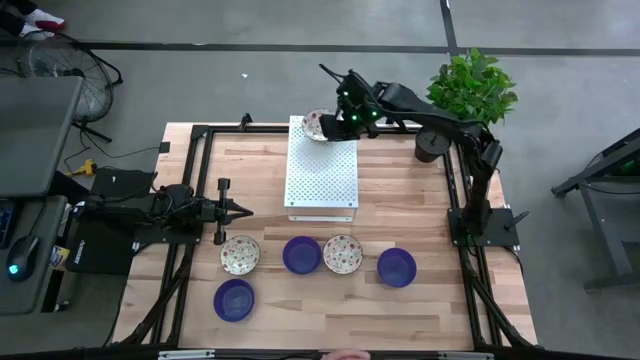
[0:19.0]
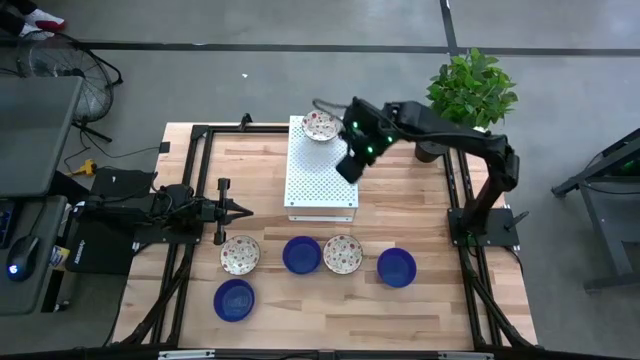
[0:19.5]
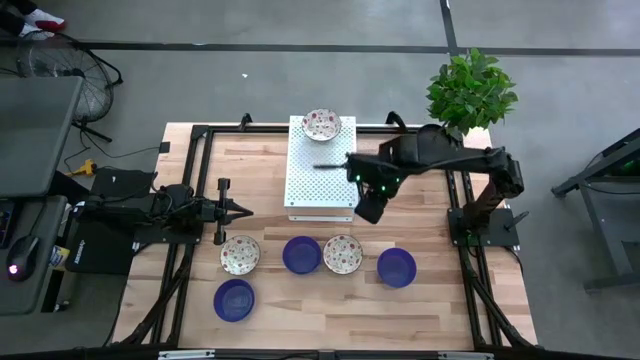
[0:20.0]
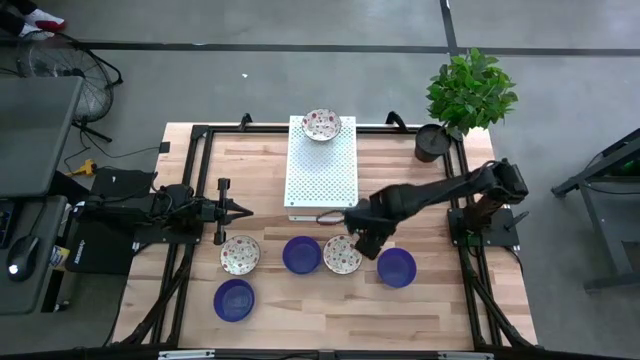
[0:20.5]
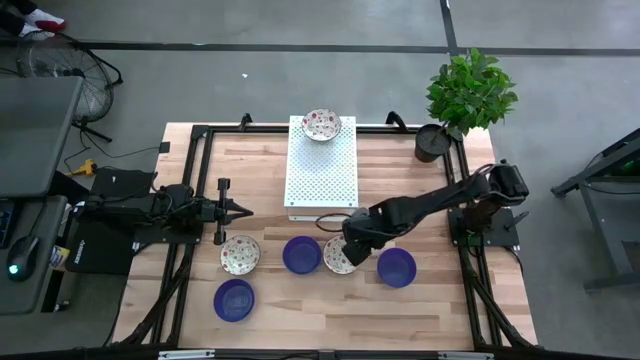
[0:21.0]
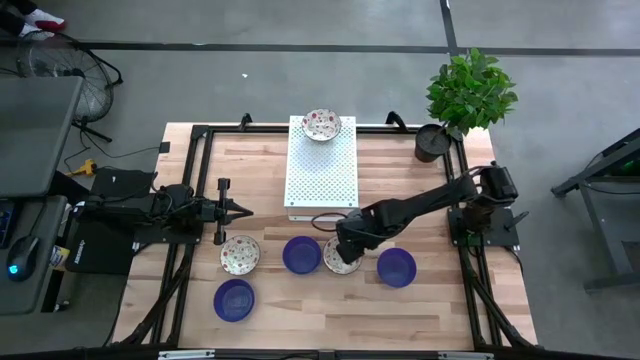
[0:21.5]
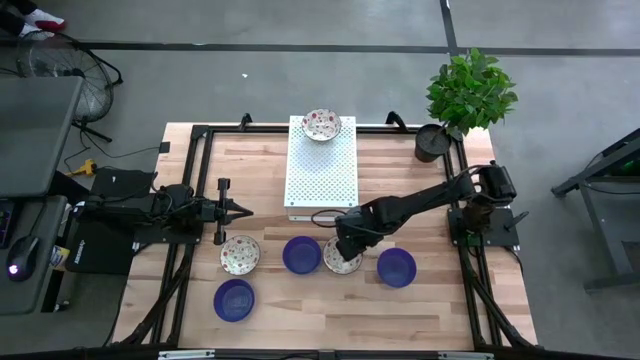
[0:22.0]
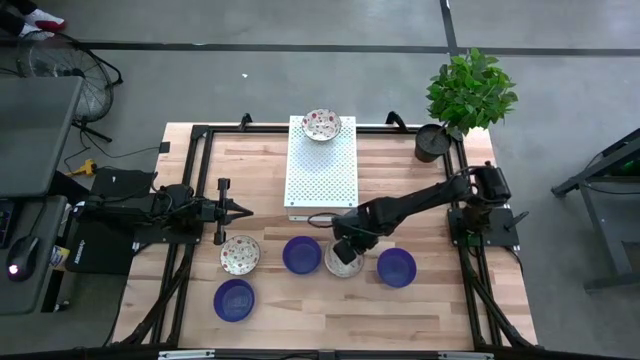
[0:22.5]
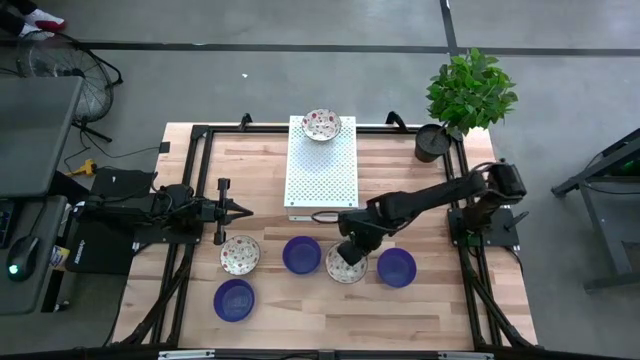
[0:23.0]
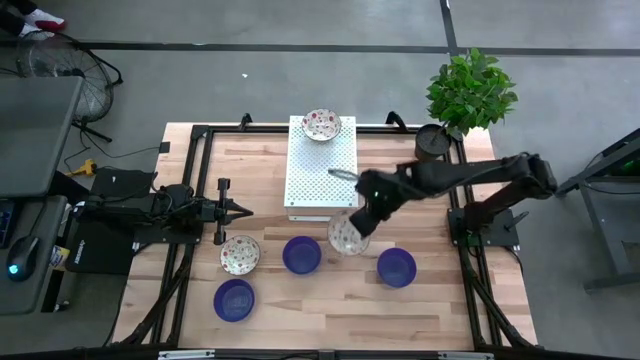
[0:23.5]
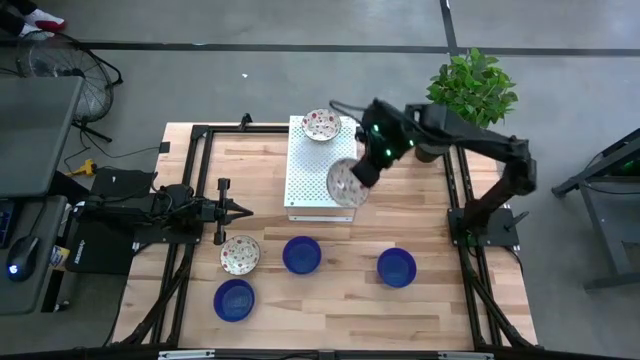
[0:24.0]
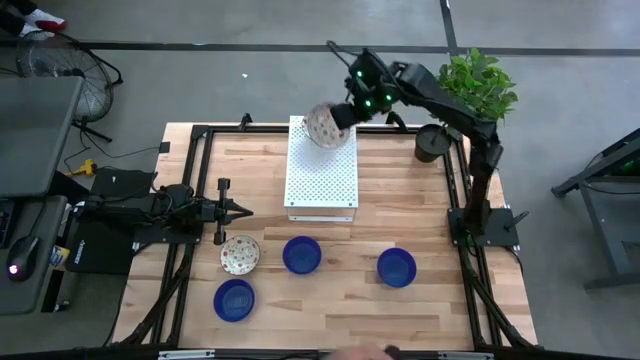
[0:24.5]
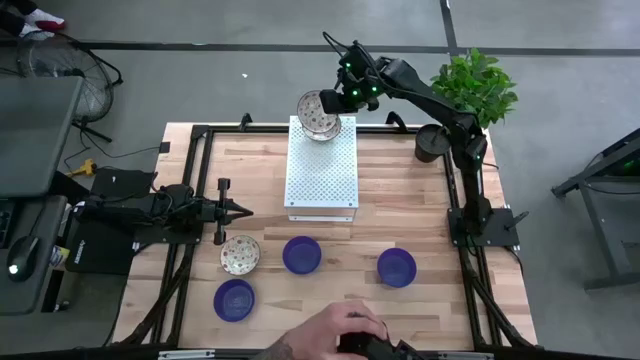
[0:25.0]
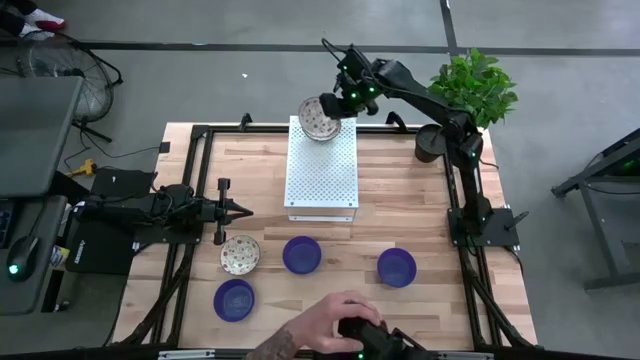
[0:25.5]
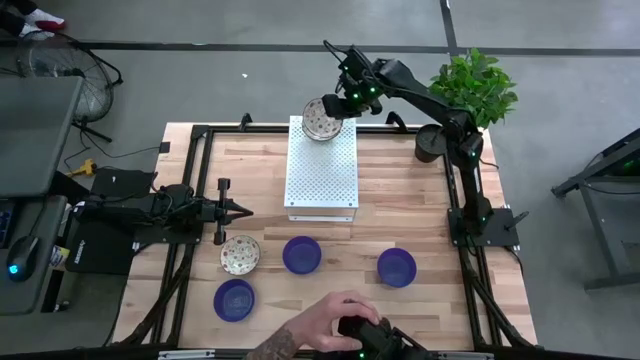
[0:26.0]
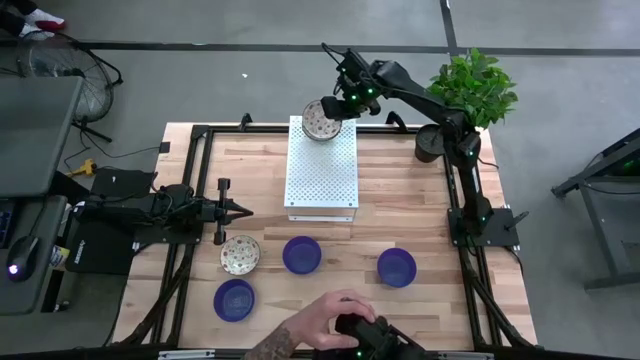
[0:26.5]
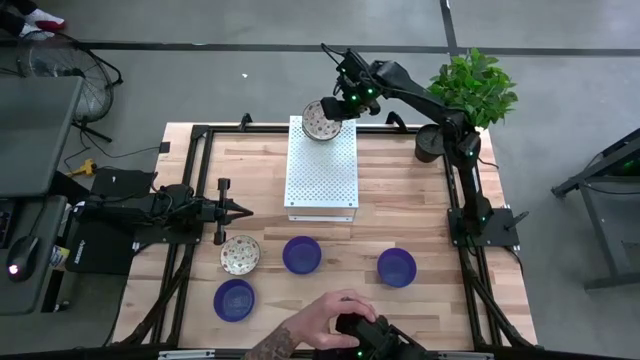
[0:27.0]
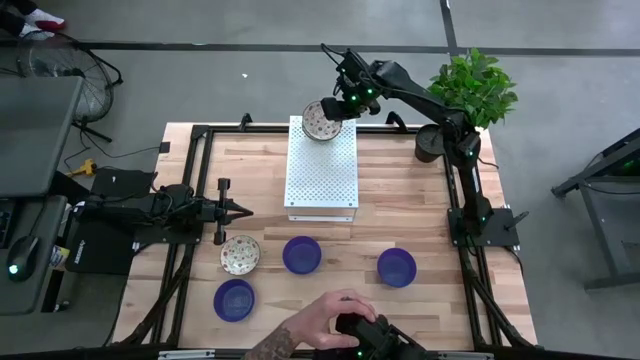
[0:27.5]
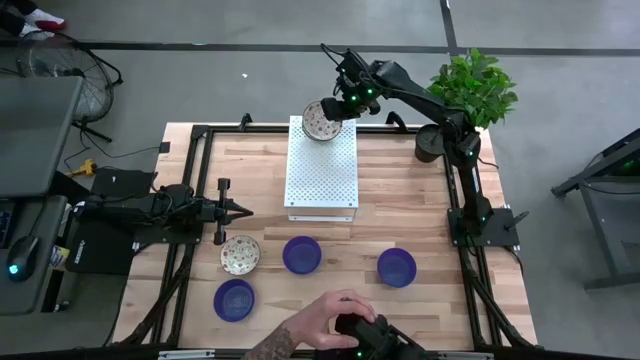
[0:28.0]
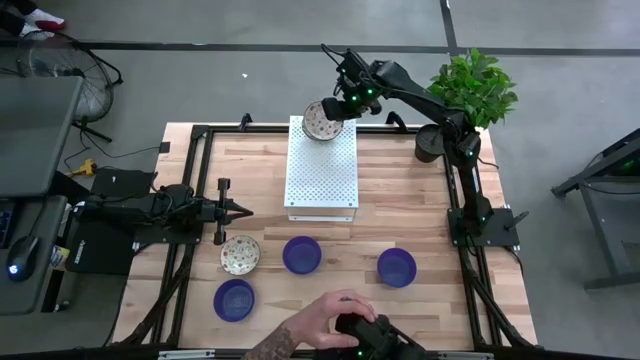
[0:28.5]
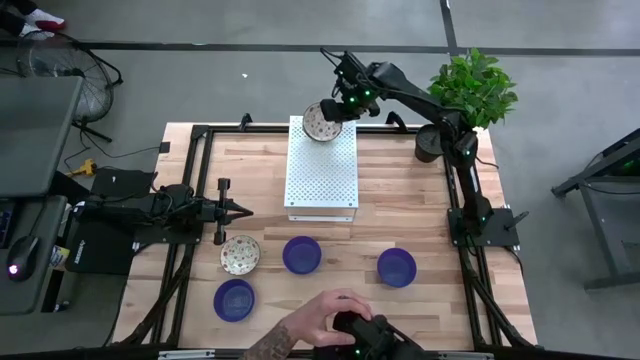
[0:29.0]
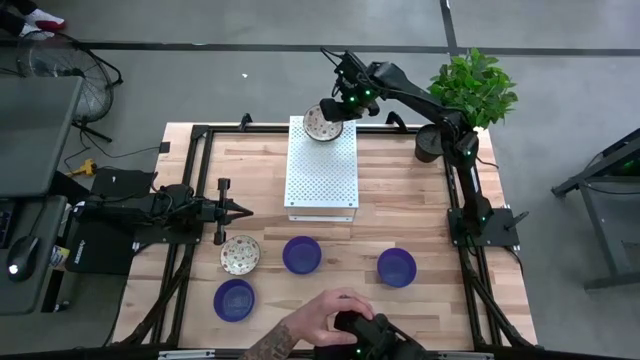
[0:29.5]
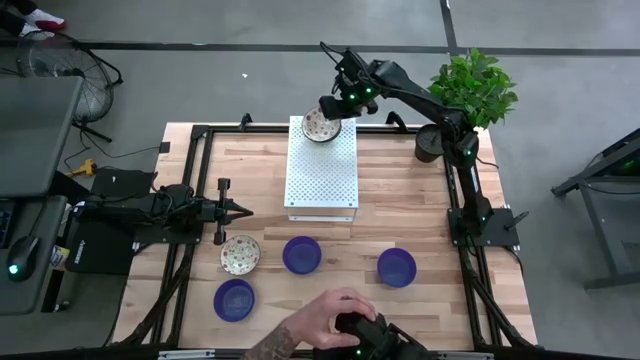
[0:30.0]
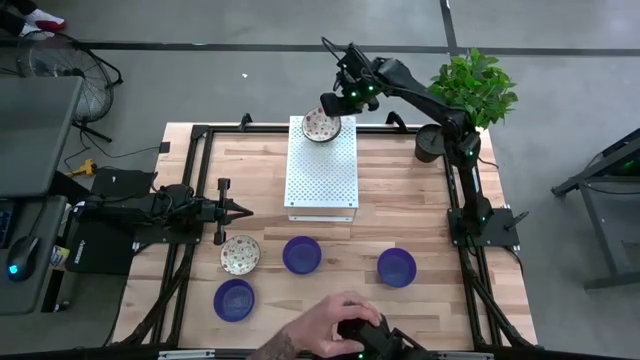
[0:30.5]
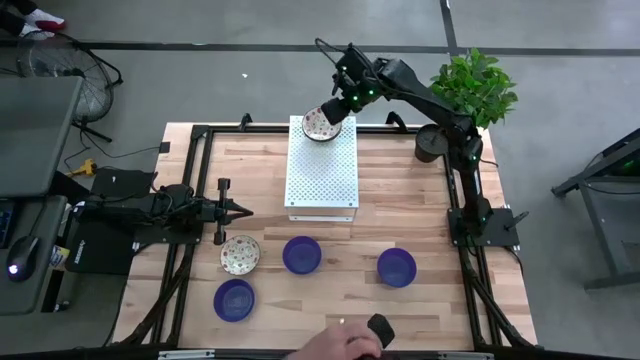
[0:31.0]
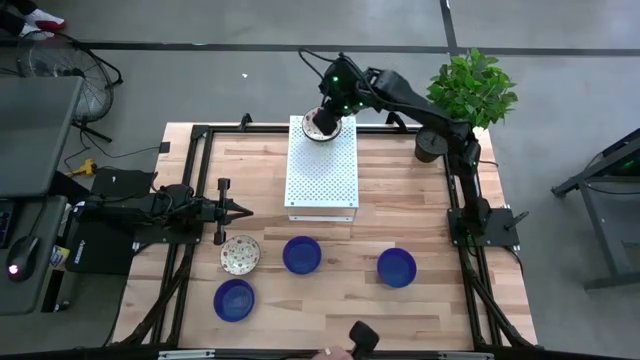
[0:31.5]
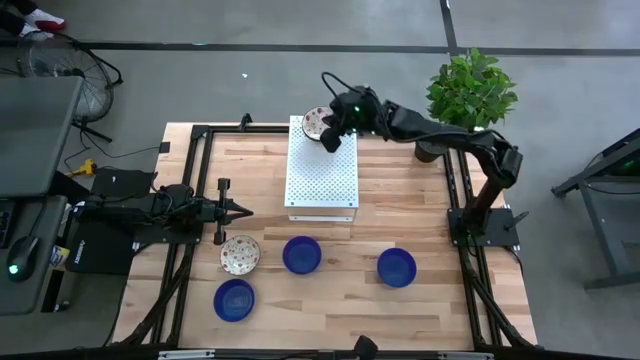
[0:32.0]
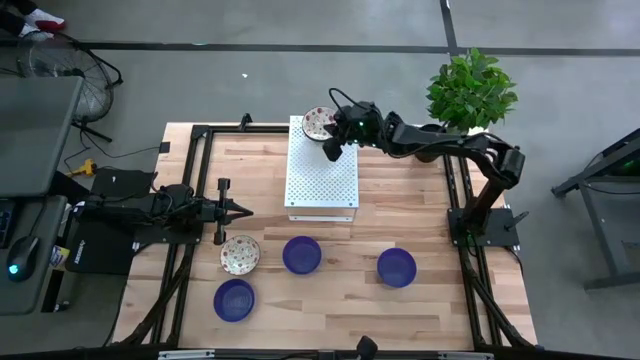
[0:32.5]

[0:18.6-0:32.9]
Task: Pick & Place Mini bowls
Stack the right green bowl on the green bowl on the shelf

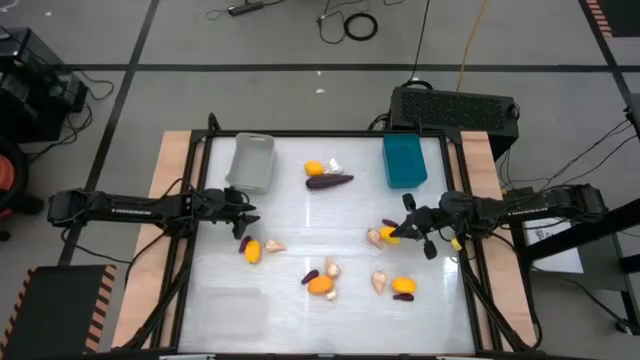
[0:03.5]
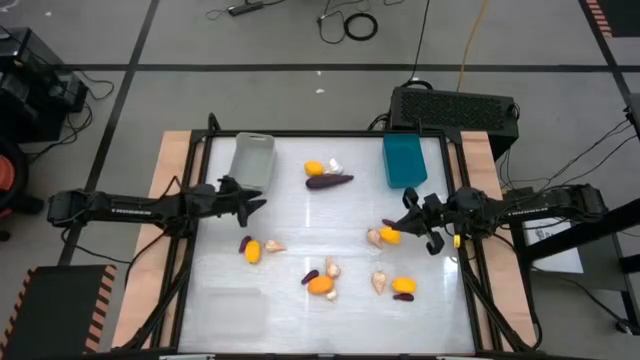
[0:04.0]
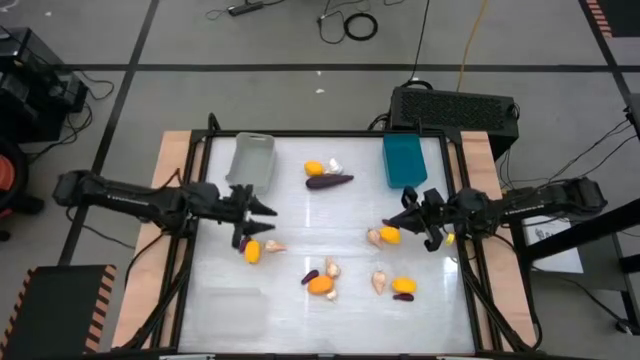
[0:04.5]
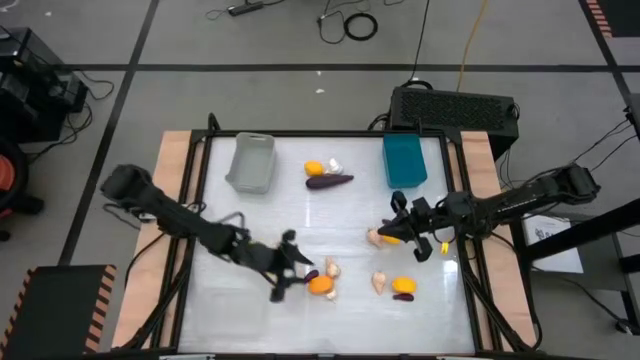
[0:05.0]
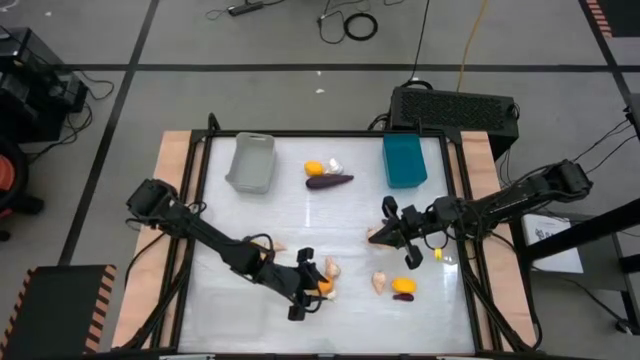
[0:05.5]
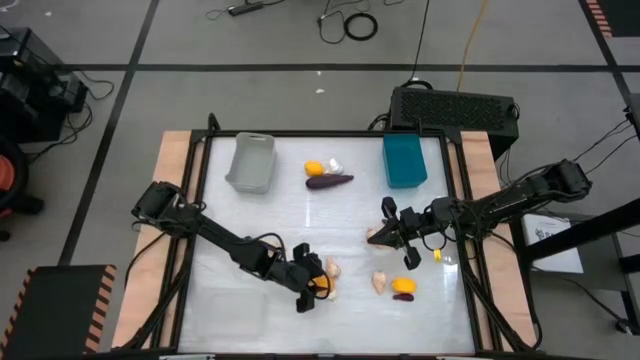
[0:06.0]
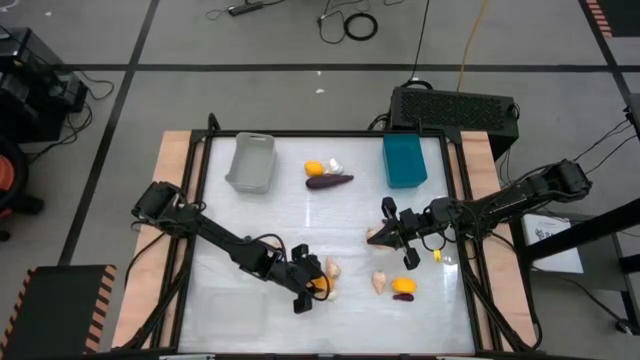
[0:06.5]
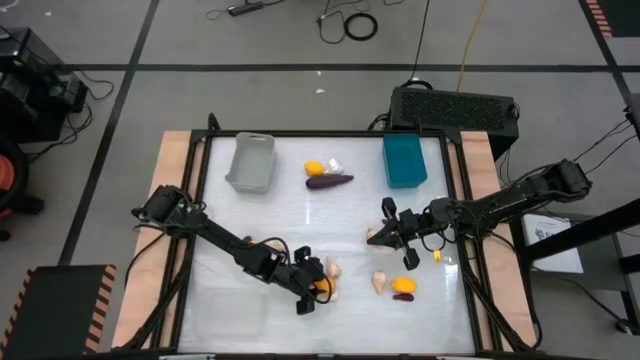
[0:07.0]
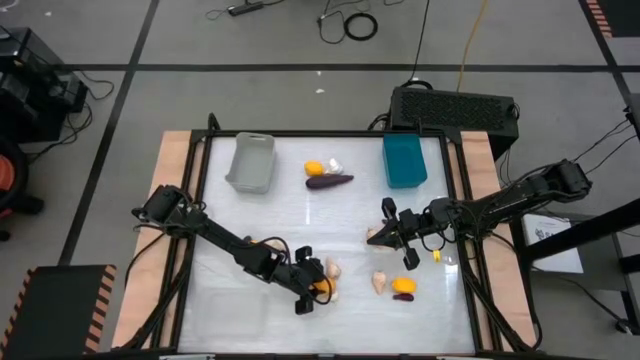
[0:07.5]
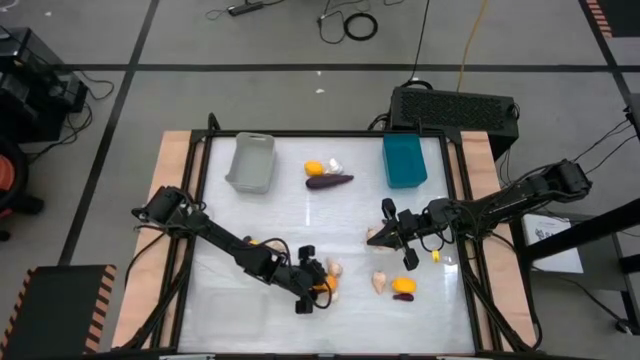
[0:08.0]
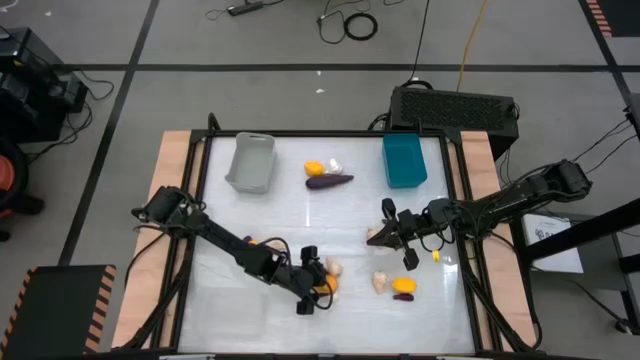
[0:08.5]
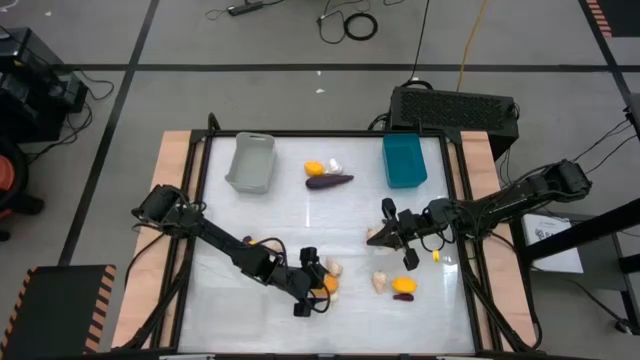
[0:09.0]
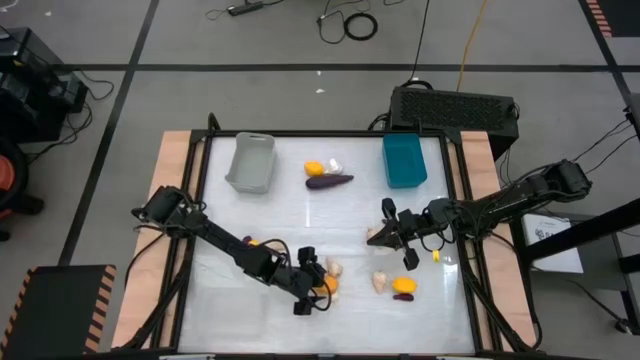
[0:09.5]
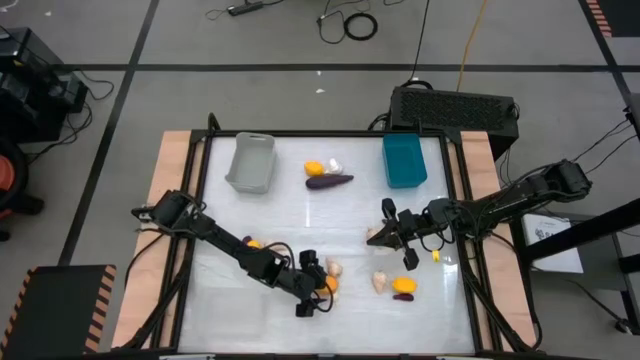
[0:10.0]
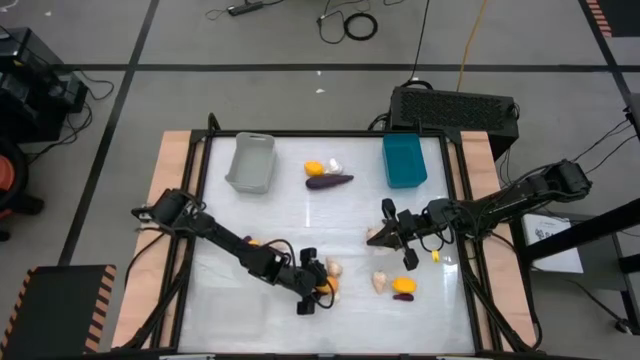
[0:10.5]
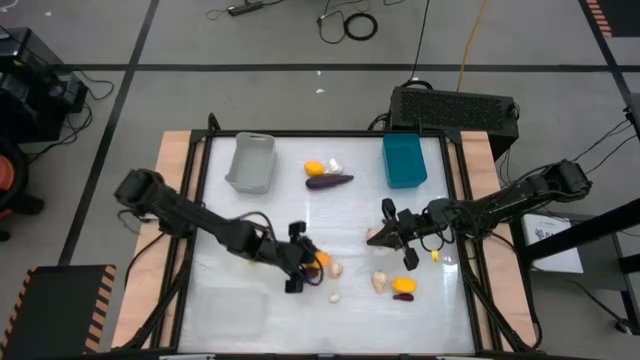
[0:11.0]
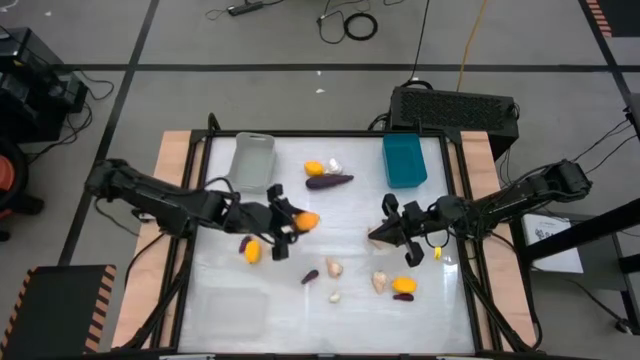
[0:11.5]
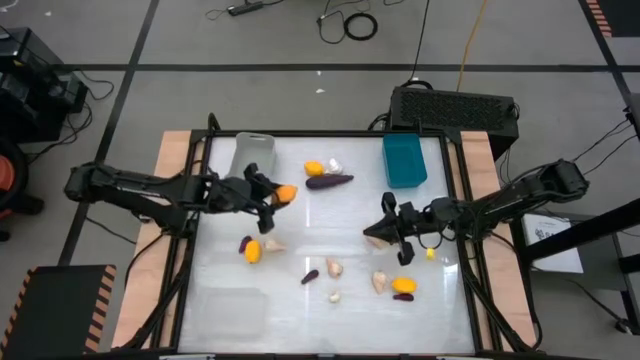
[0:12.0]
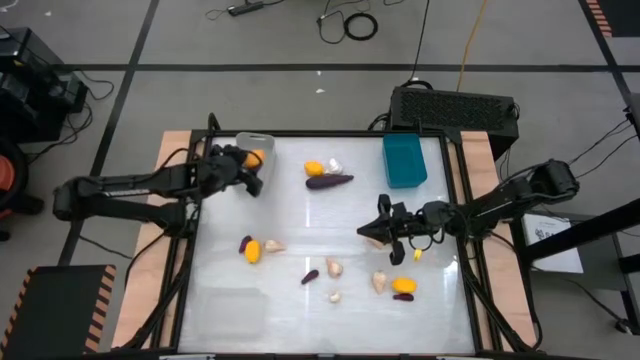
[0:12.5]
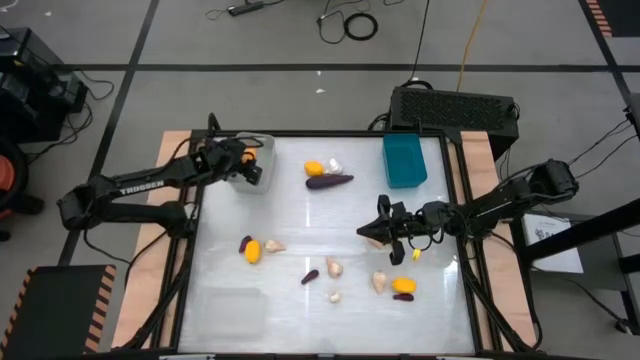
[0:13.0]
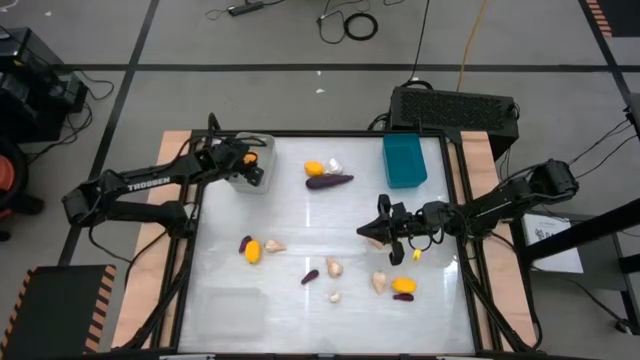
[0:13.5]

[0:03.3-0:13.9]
Task: Sort produce into baskets
Put the lemon into the gray bin
